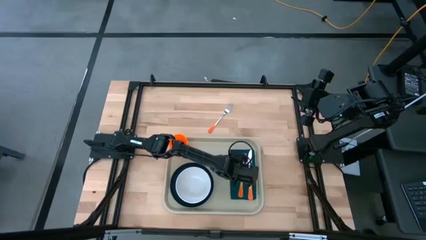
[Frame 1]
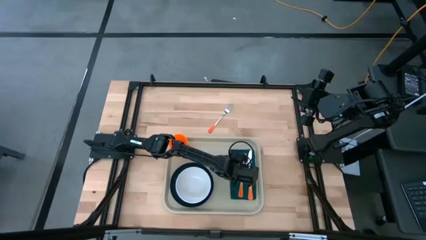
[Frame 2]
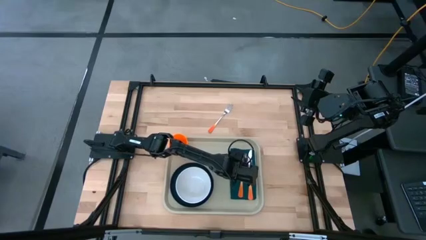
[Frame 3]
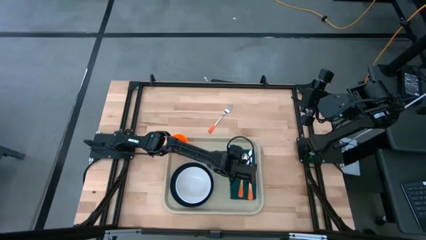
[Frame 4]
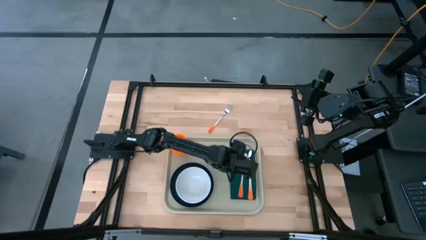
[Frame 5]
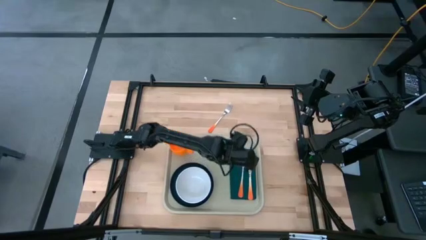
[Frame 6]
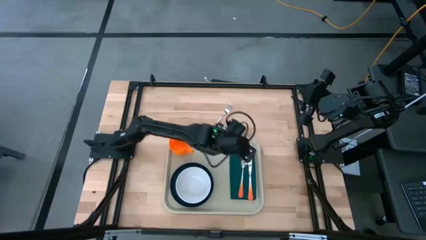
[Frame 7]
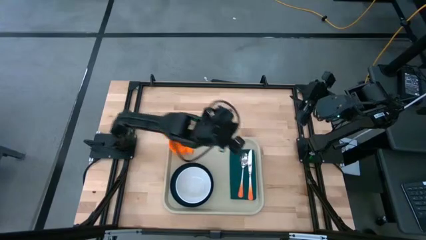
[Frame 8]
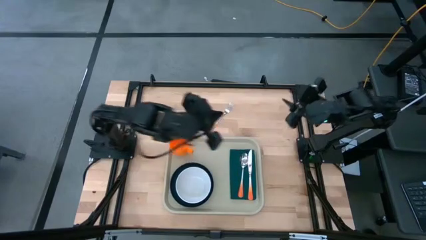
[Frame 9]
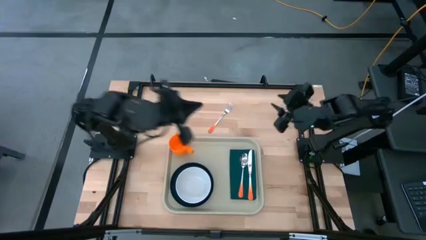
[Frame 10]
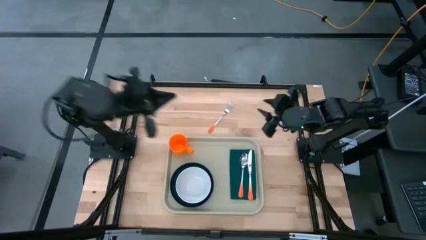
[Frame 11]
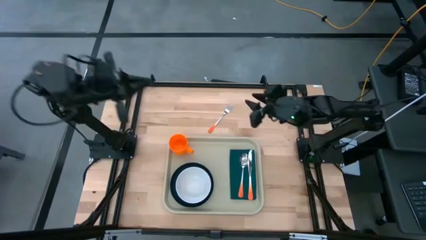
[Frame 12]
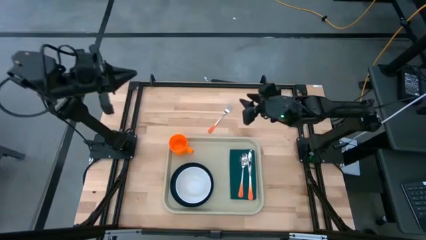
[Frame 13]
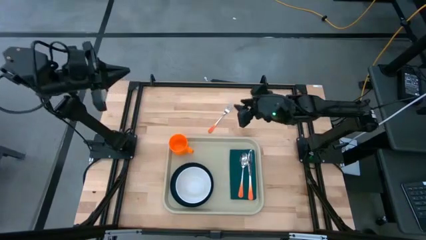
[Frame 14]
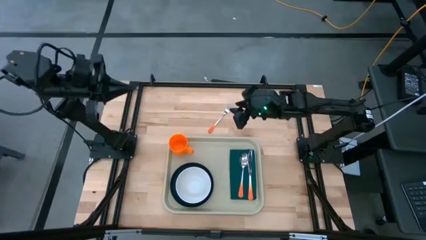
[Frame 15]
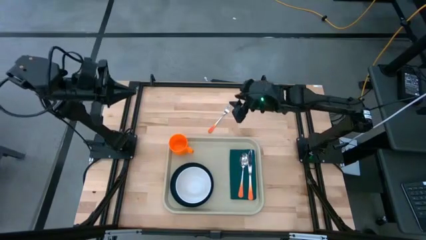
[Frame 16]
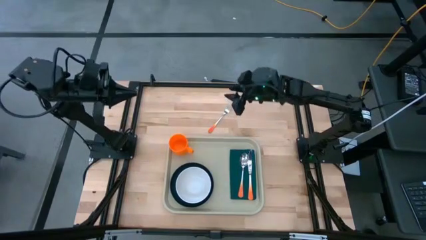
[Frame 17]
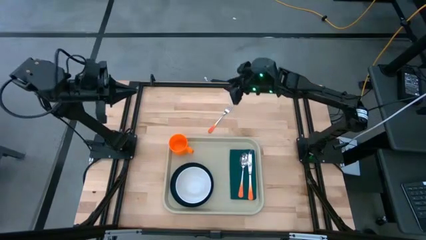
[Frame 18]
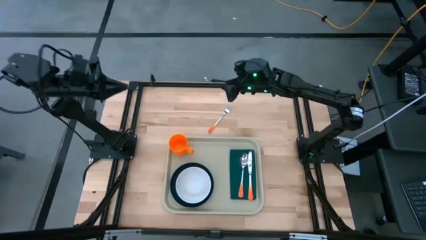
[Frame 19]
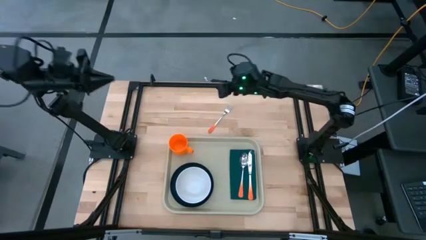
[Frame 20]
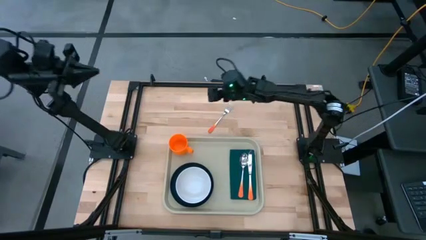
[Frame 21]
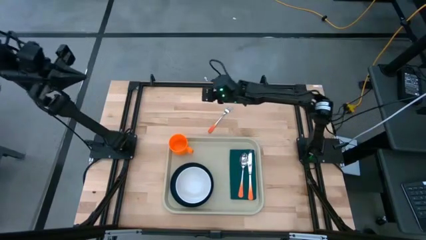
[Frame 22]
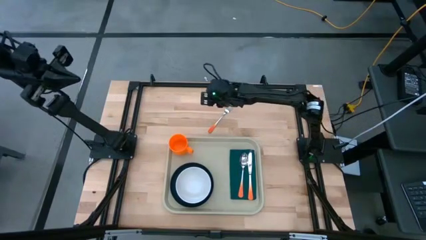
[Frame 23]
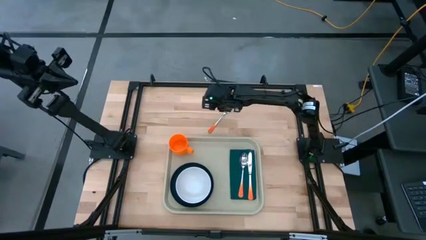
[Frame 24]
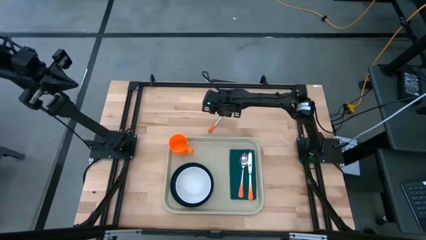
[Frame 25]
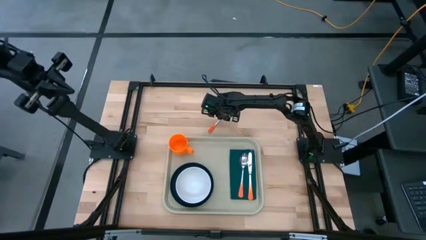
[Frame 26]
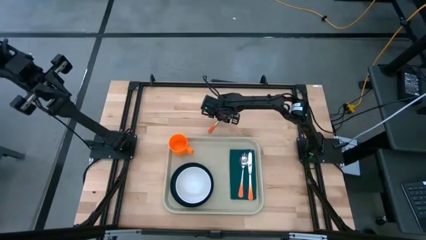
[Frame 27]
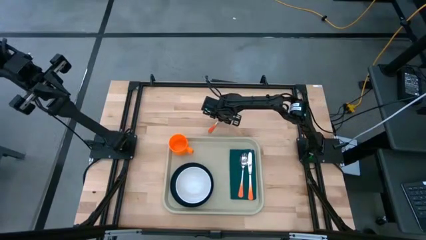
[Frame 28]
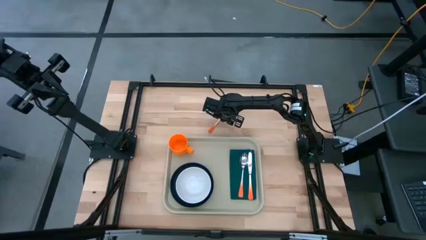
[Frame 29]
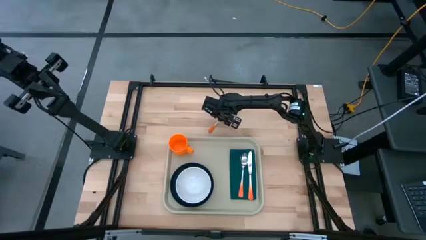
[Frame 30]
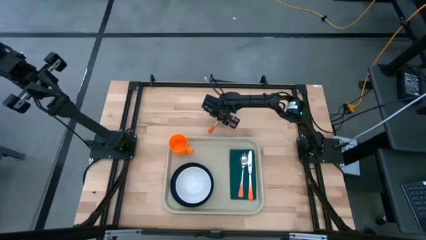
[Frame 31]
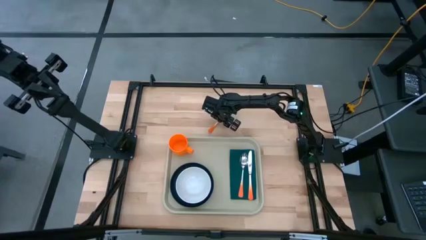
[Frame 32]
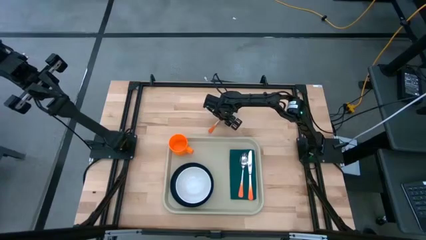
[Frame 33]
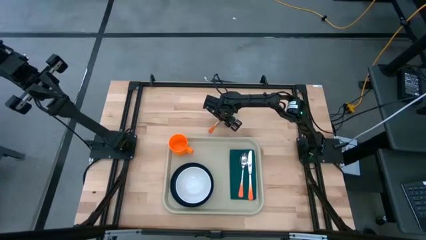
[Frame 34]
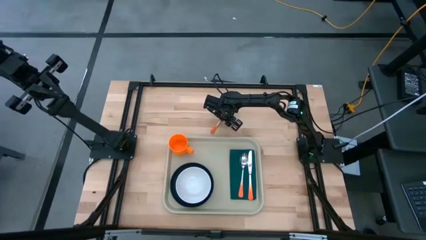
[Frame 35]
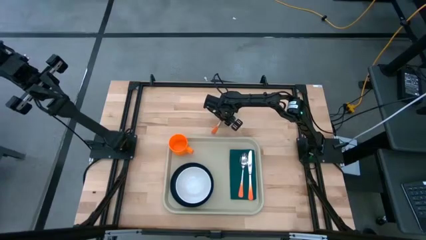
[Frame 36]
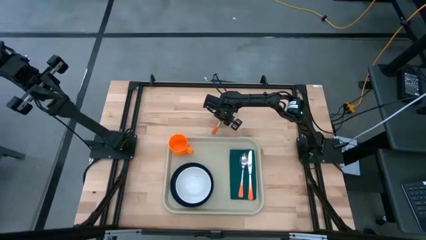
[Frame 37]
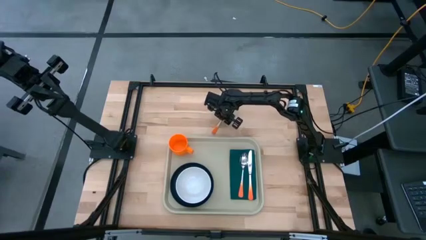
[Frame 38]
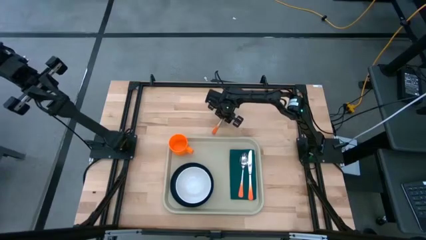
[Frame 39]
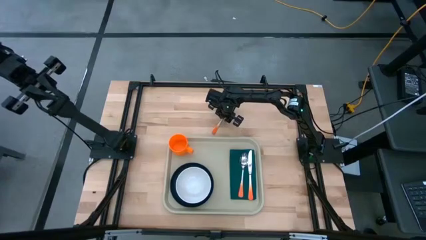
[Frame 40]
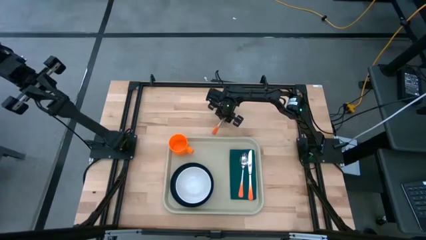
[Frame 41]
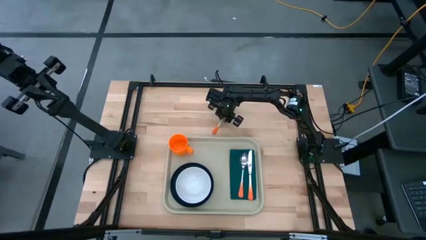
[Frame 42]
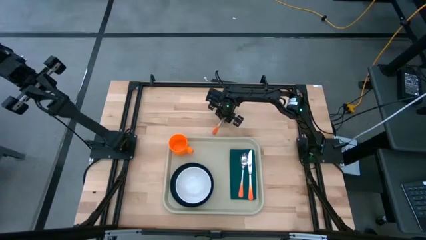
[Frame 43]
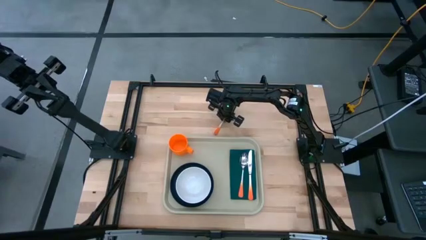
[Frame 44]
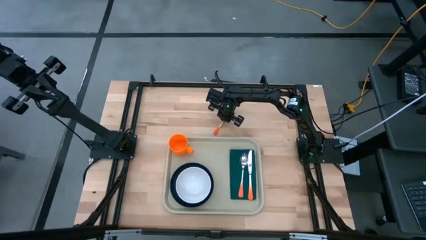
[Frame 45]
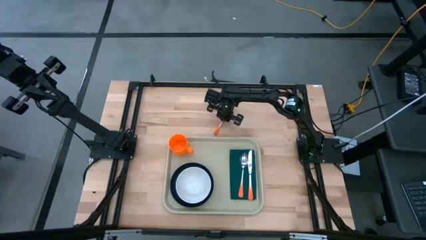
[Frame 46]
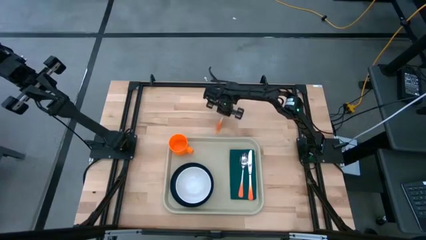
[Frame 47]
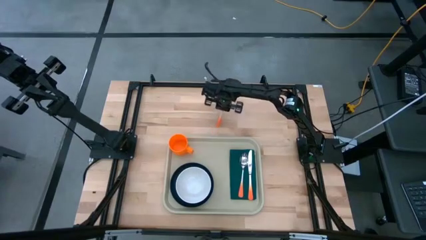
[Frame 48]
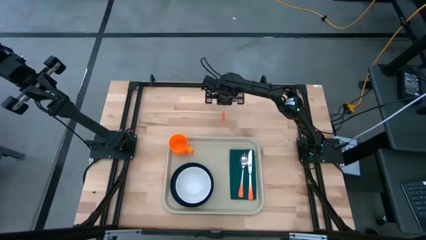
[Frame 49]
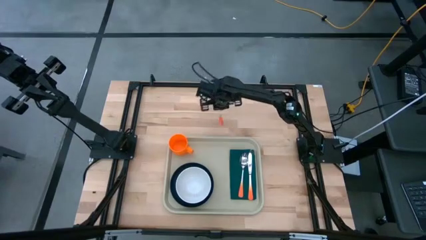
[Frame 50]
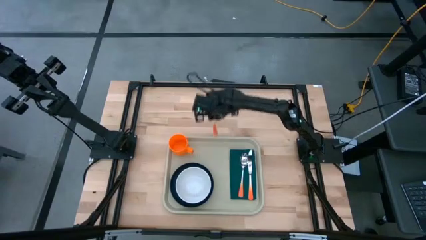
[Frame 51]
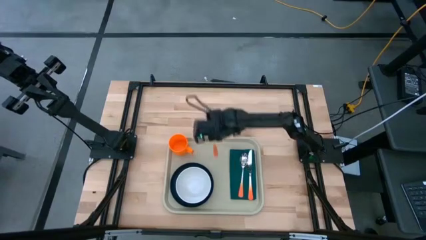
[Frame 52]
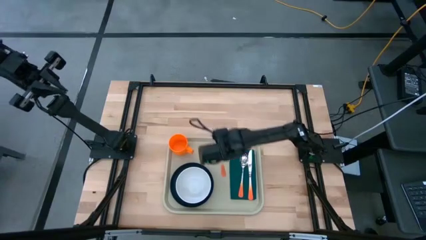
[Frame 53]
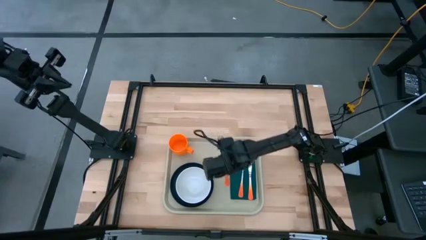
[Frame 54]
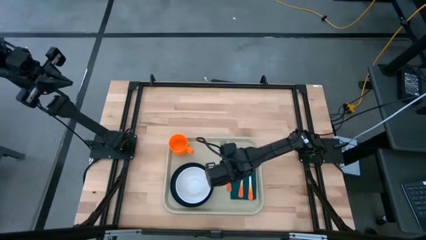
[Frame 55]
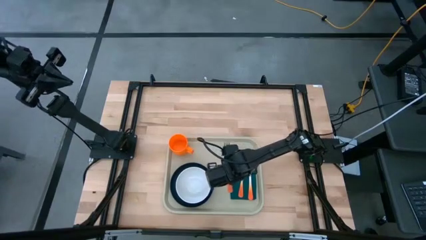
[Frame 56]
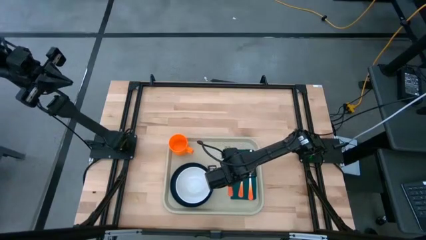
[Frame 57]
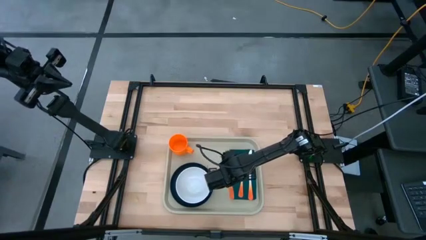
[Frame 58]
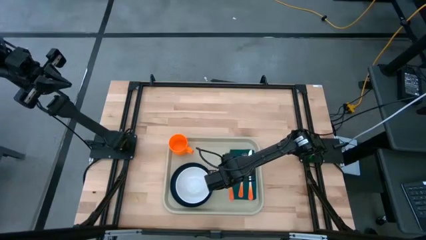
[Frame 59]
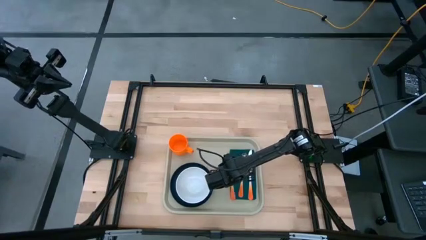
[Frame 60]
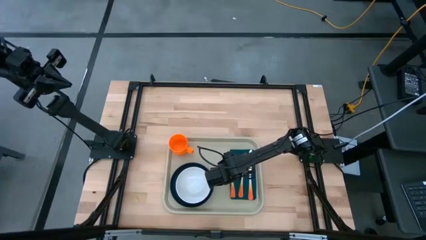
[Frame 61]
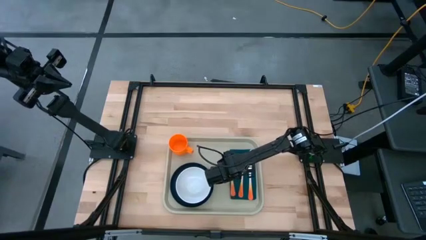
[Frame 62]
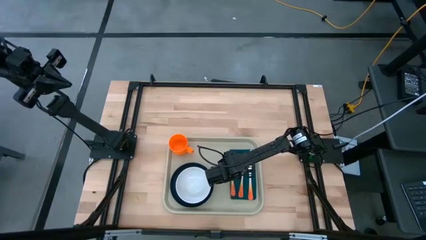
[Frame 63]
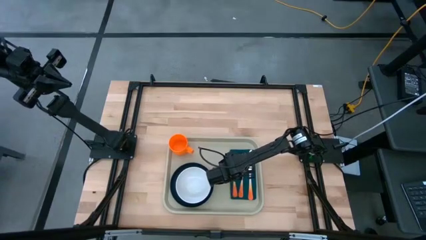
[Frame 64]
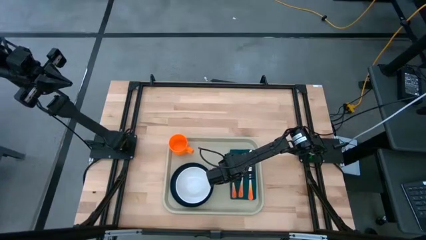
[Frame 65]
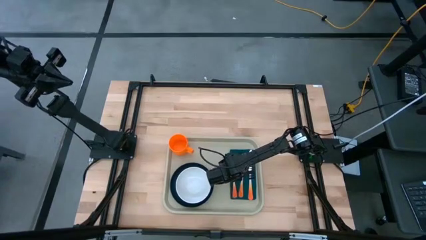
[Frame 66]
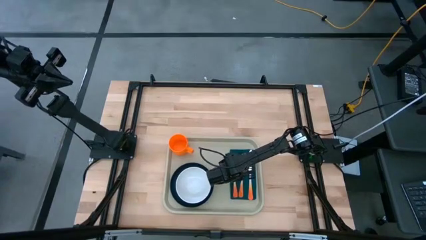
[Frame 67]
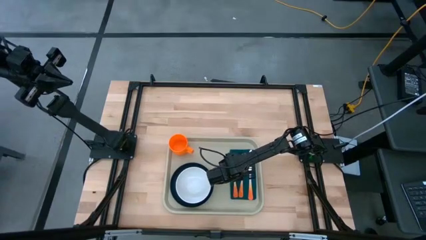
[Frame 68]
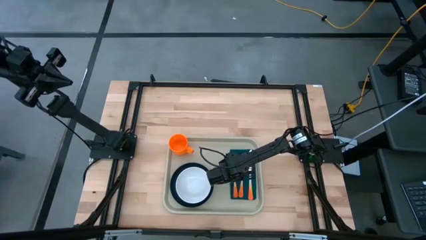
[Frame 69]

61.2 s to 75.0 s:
Task: Set up tray
Put the orange fork to the left of the orange spoon on the green napkin

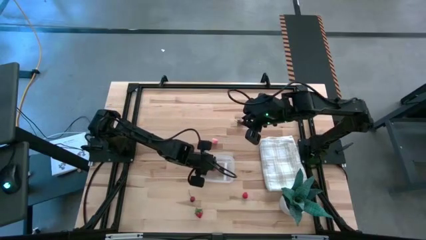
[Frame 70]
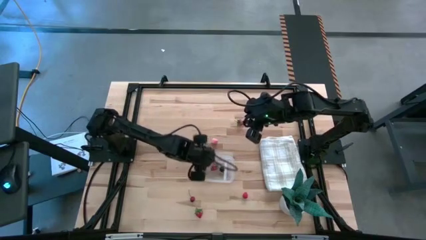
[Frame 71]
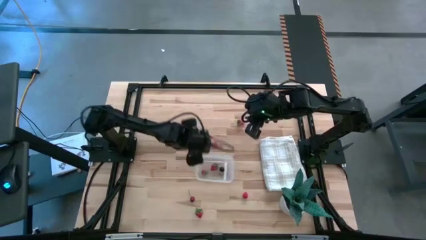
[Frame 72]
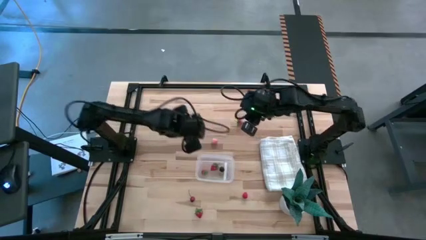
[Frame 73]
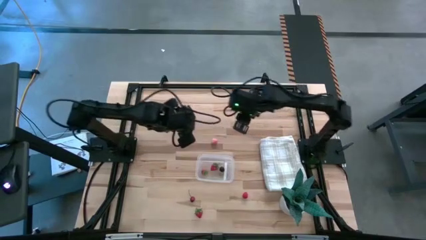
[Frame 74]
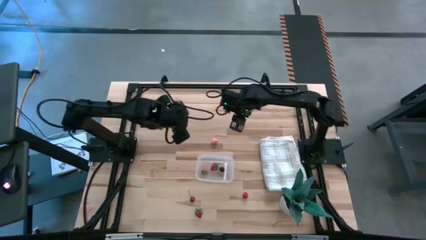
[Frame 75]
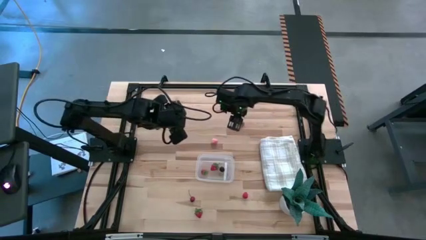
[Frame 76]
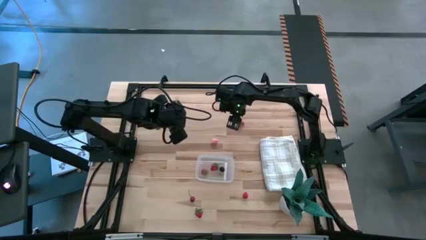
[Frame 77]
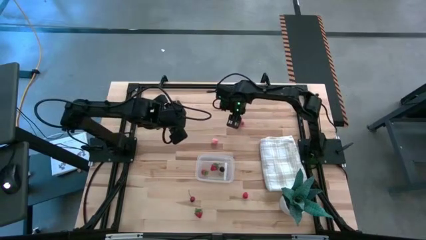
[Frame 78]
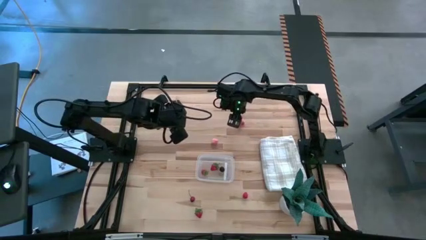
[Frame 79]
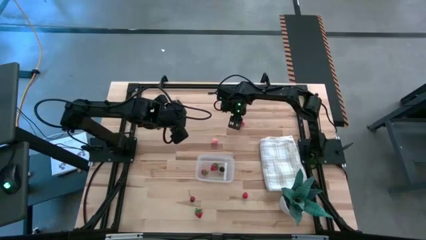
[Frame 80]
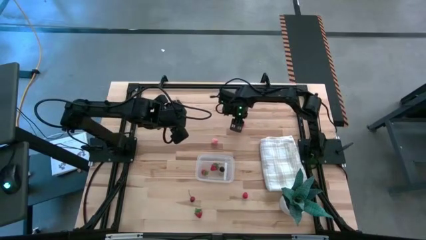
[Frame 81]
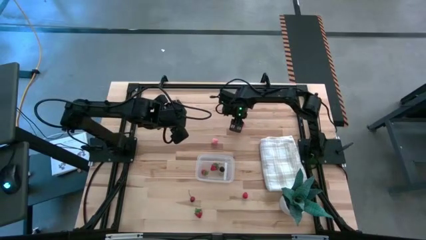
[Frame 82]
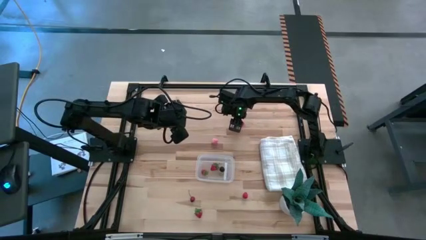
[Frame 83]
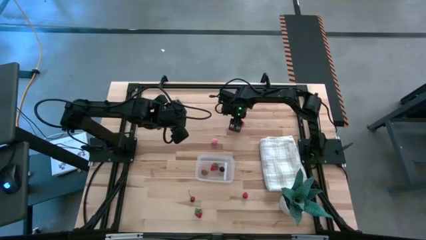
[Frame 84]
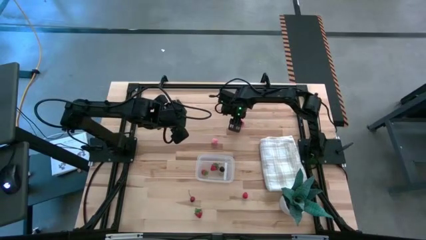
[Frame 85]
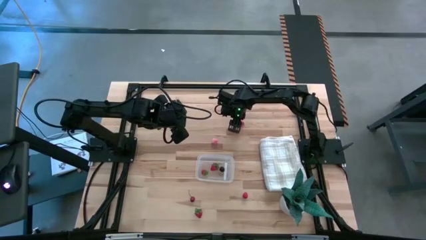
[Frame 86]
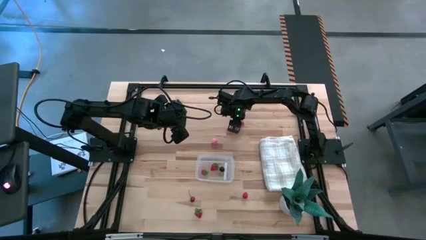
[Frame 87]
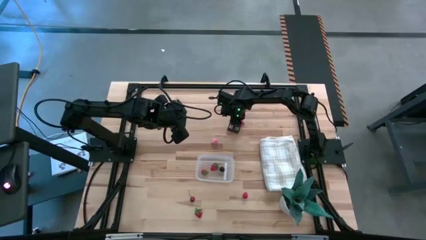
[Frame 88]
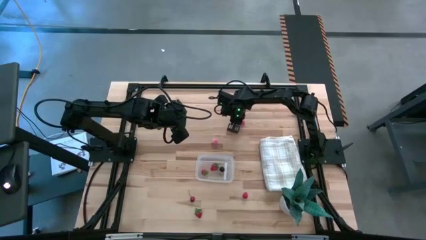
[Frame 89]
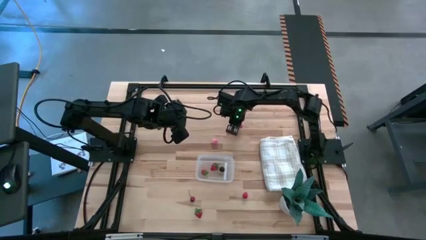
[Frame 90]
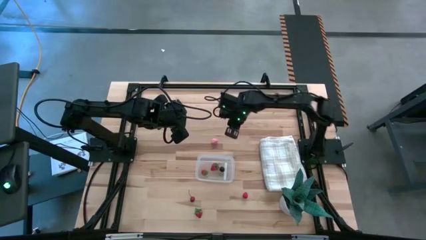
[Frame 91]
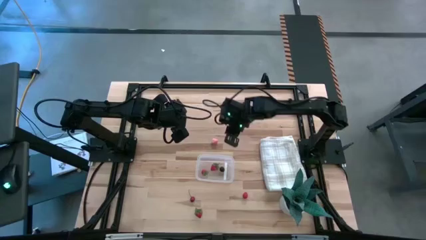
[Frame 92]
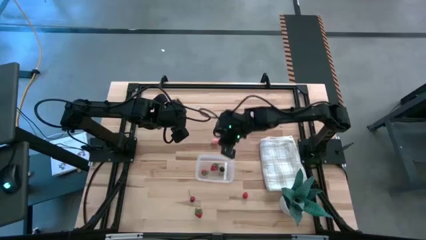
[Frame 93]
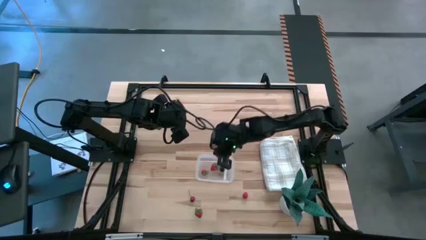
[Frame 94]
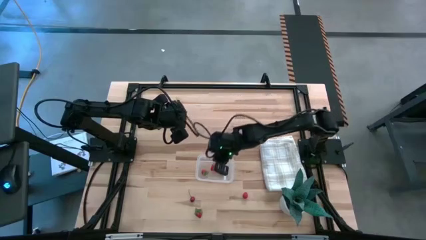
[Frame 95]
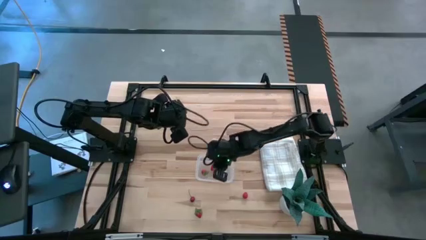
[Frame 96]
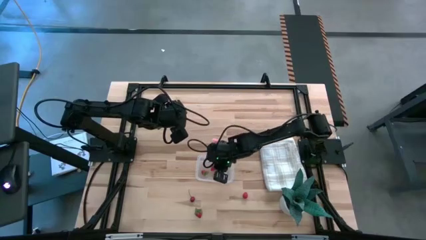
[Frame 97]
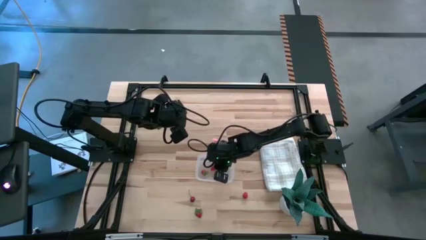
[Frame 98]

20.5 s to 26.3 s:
Task: Pick and placing Produce into tupperware
Put the top strawberry into the bin
